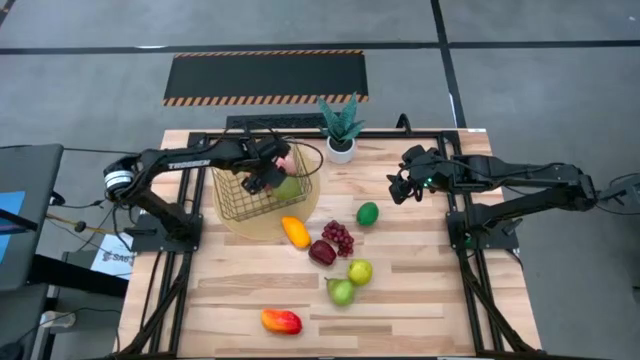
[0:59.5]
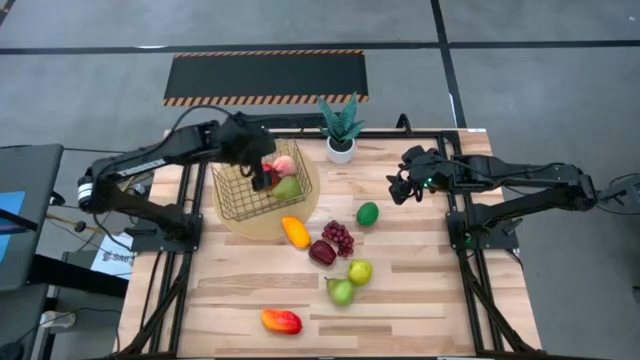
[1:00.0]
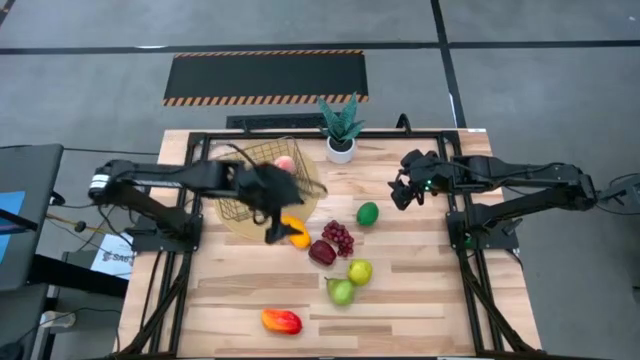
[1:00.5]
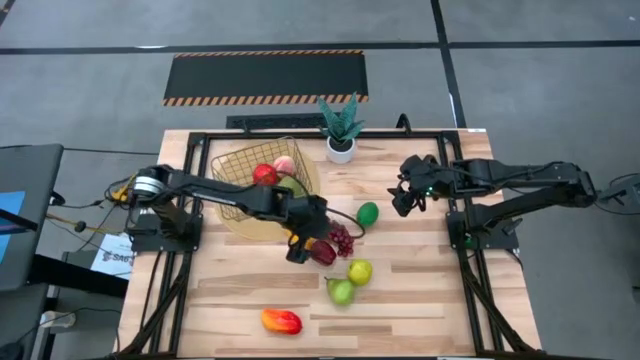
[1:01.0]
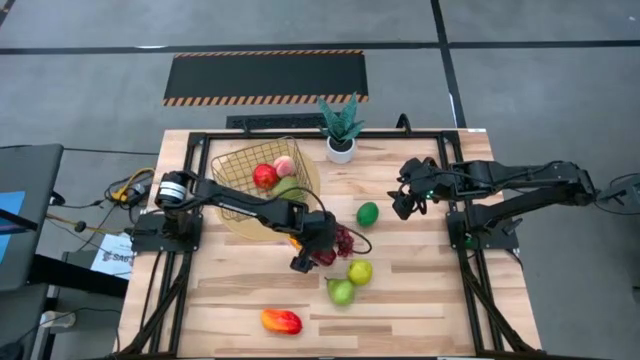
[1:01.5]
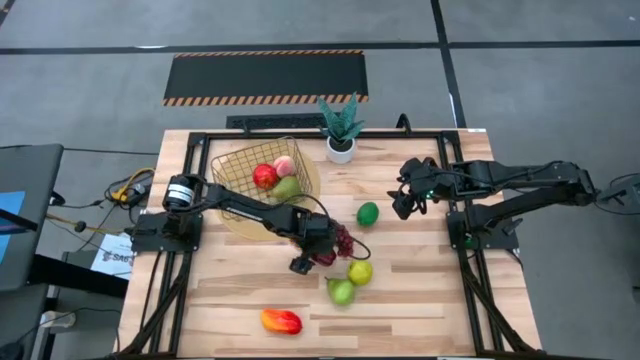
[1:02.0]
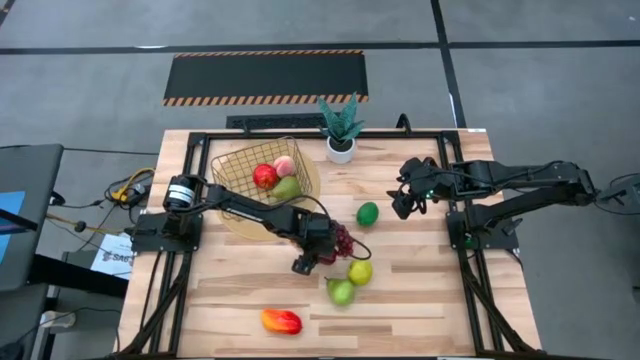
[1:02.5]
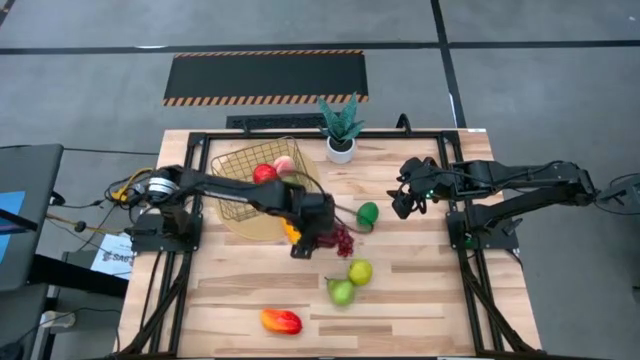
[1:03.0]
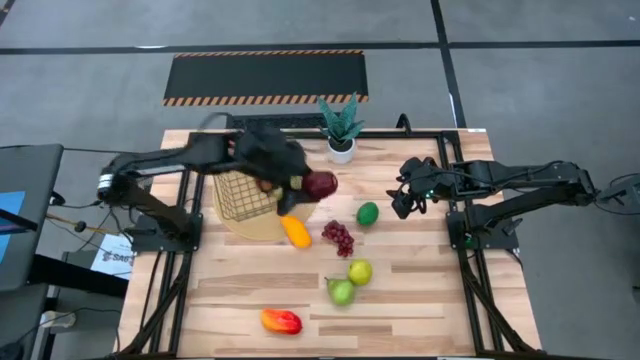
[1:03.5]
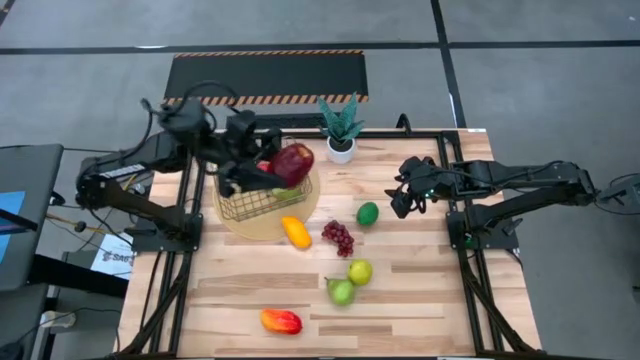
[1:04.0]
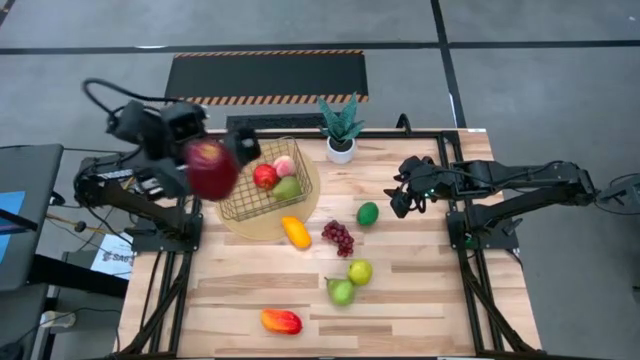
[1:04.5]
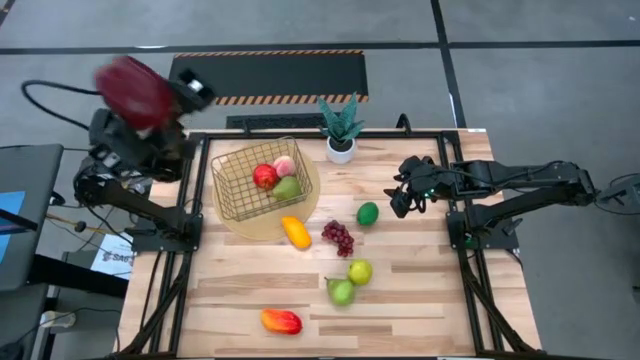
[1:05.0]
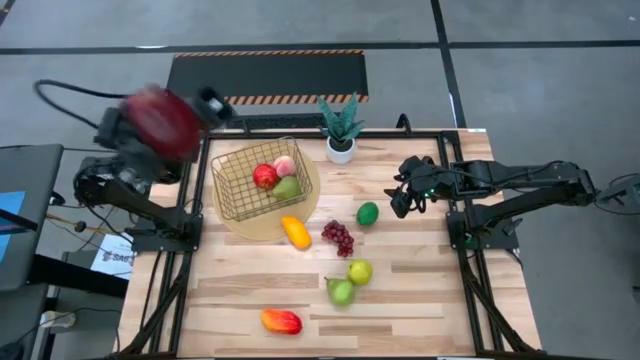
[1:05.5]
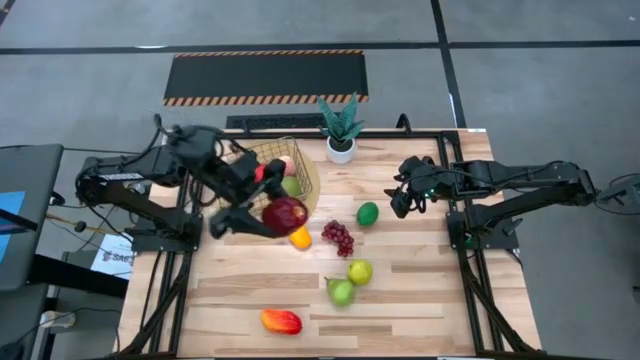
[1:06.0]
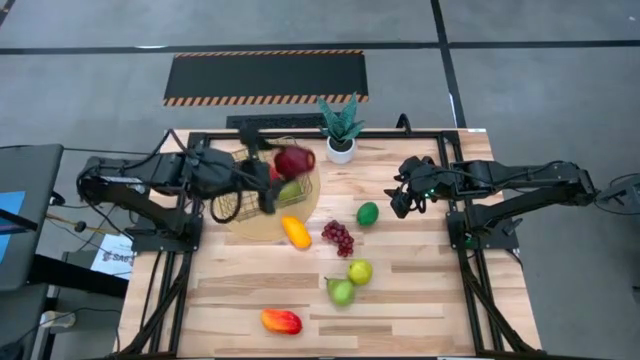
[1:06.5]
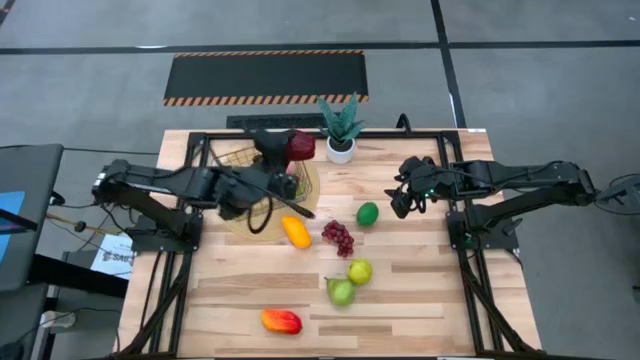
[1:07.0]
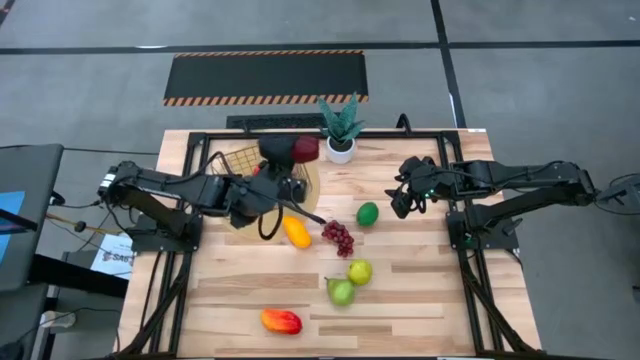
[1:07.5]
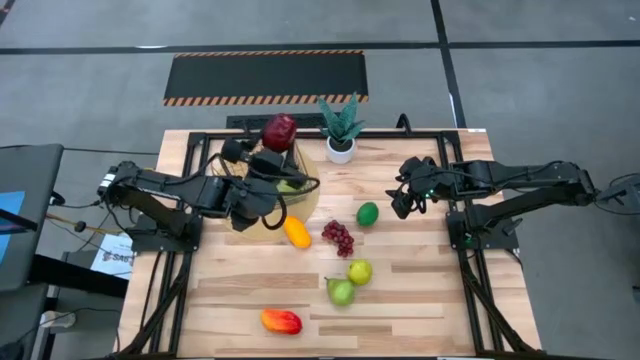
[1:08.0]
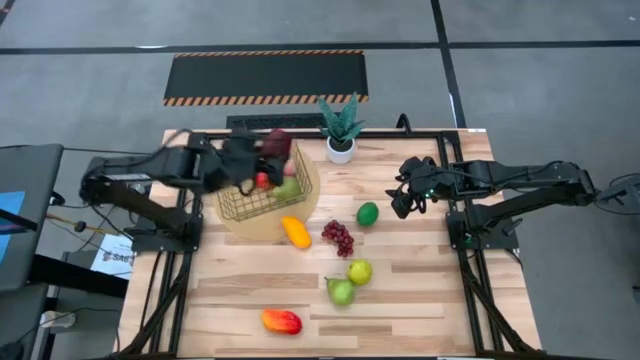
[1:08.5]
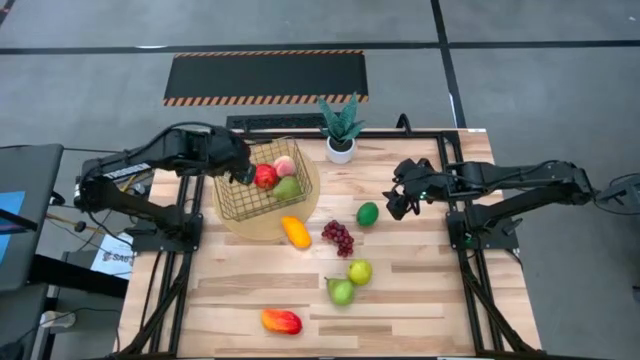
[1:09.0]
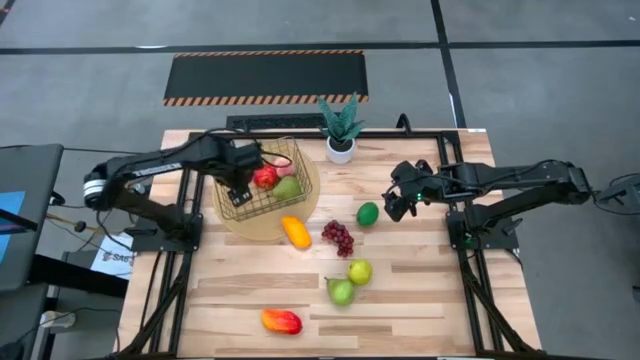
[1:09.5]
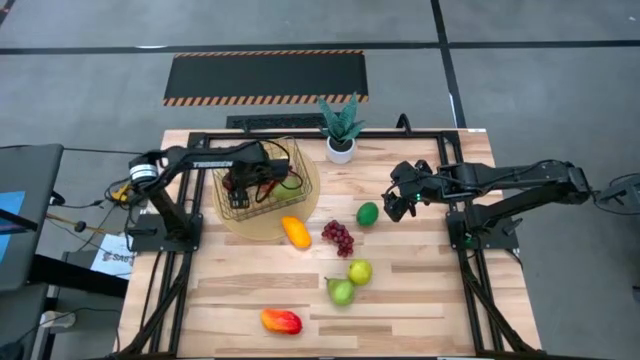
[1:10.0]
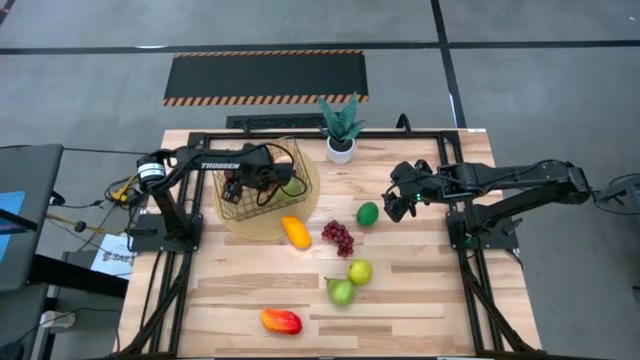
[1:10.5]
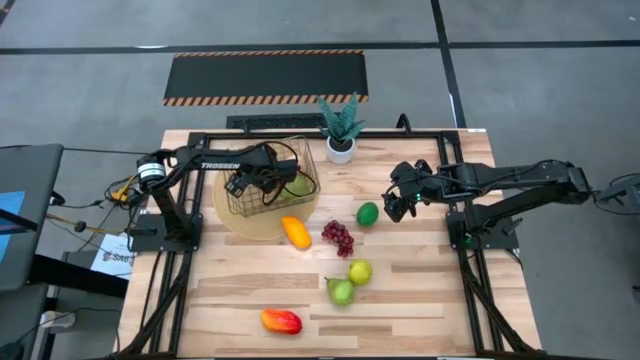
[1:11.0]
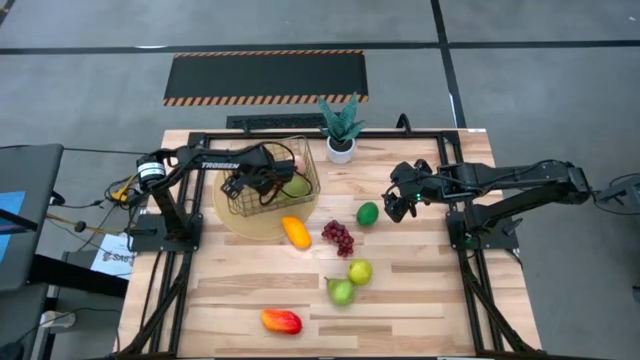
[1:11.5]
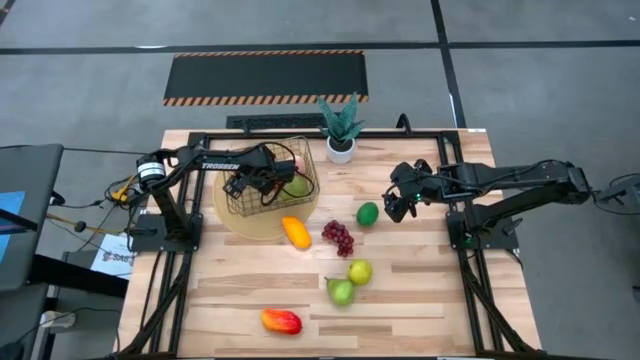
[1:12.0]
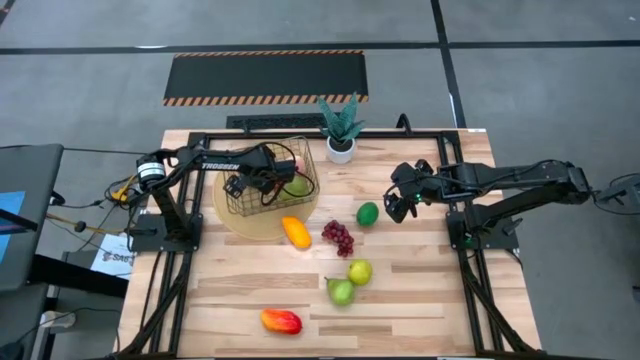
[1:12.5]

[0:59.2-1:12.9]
Task: Build produce basket
Put the dark red apple into the wire basket
